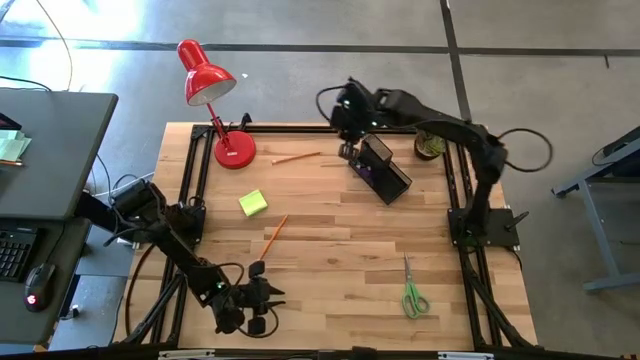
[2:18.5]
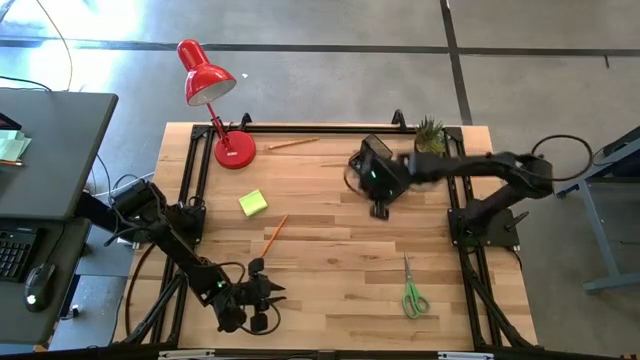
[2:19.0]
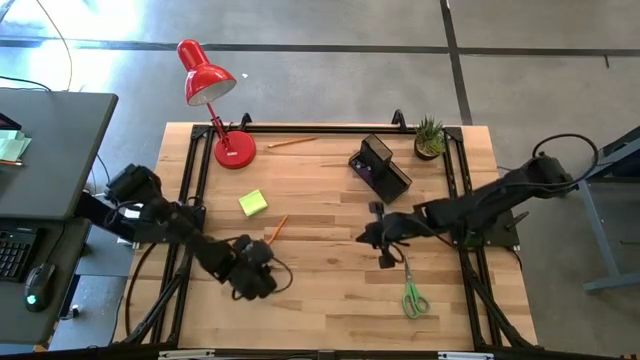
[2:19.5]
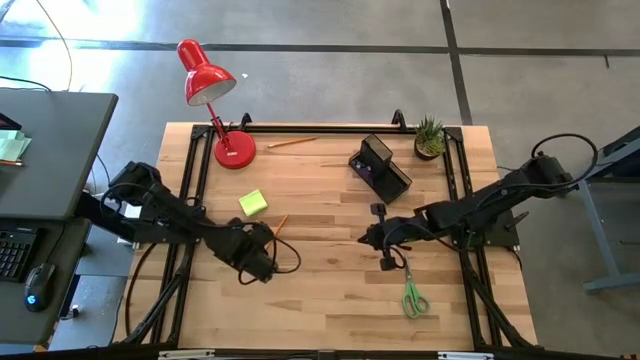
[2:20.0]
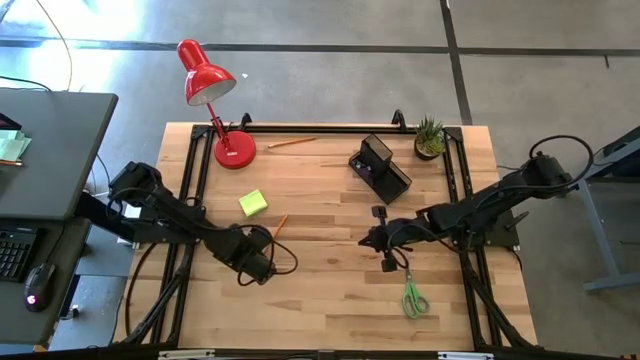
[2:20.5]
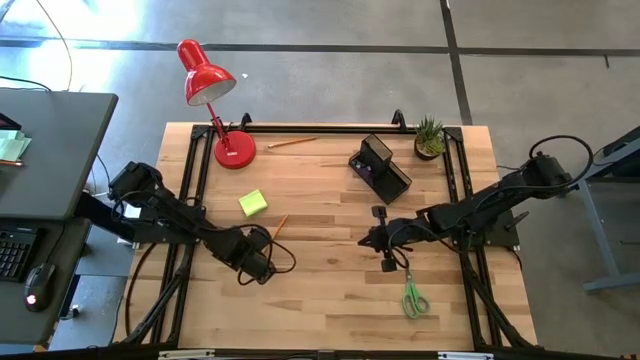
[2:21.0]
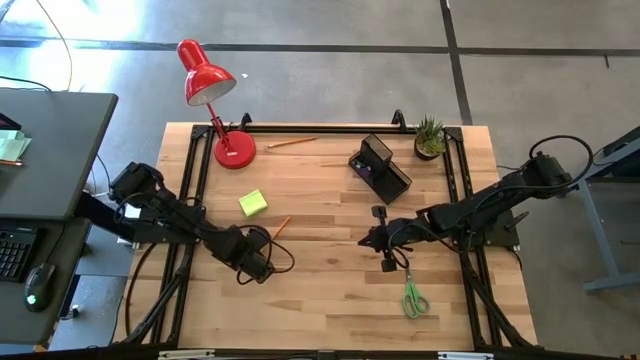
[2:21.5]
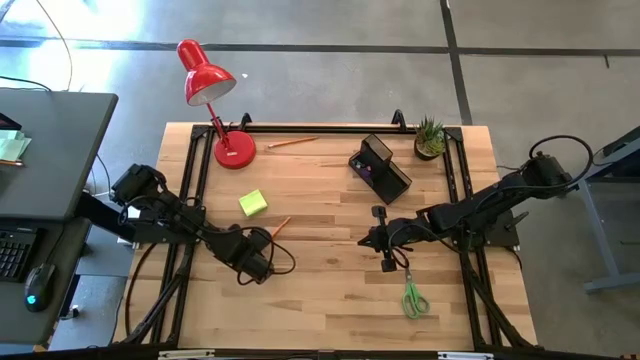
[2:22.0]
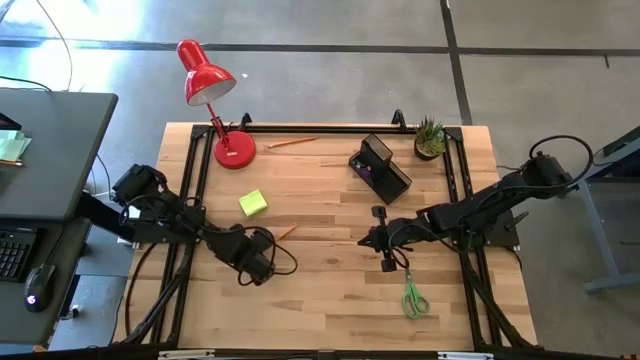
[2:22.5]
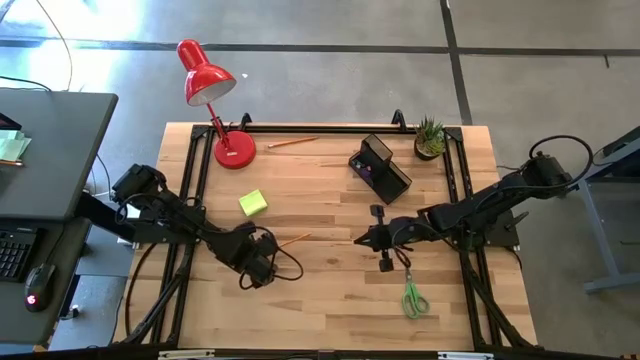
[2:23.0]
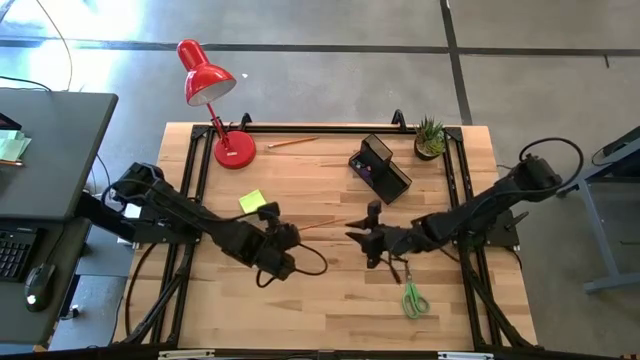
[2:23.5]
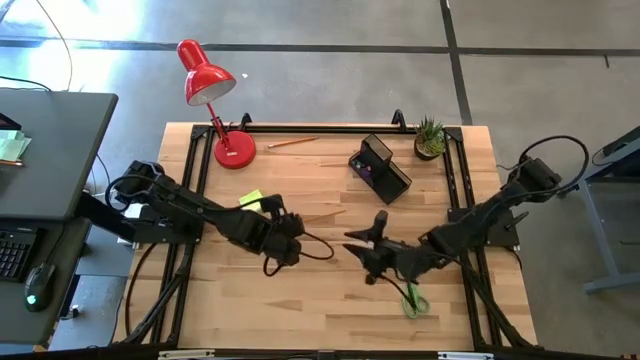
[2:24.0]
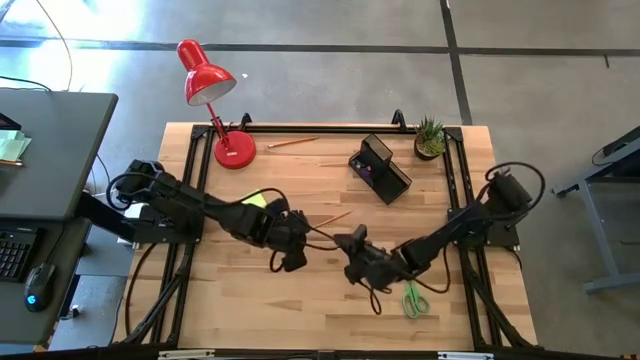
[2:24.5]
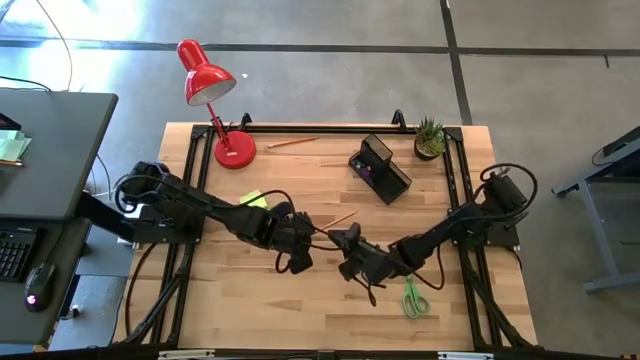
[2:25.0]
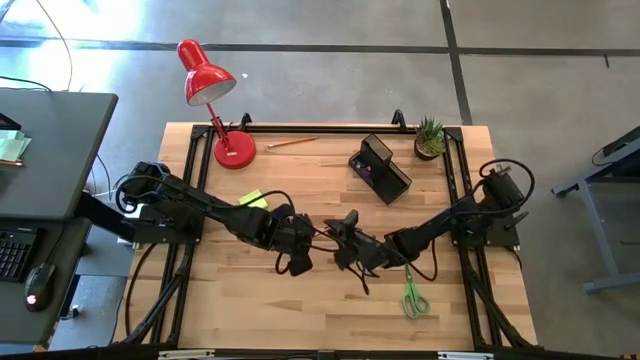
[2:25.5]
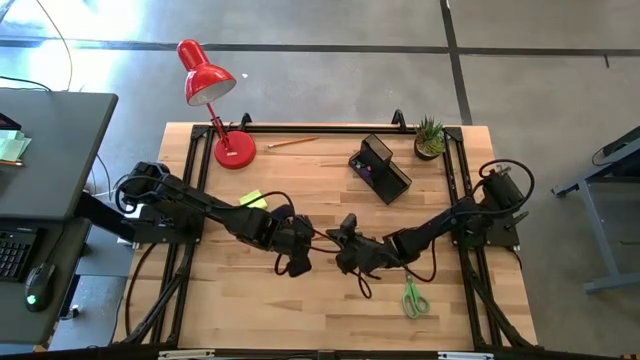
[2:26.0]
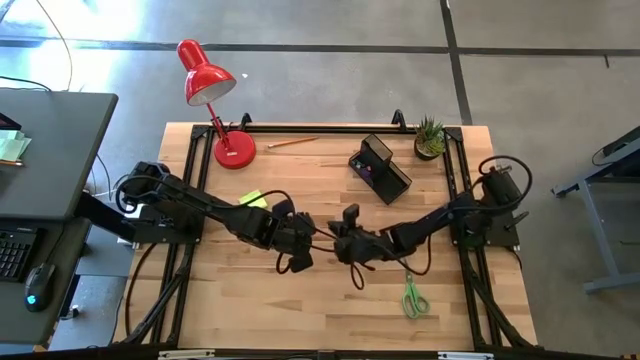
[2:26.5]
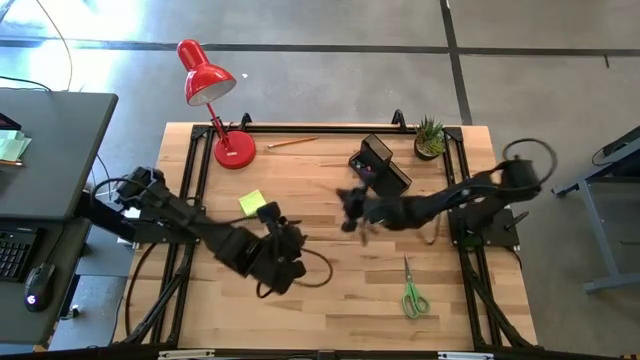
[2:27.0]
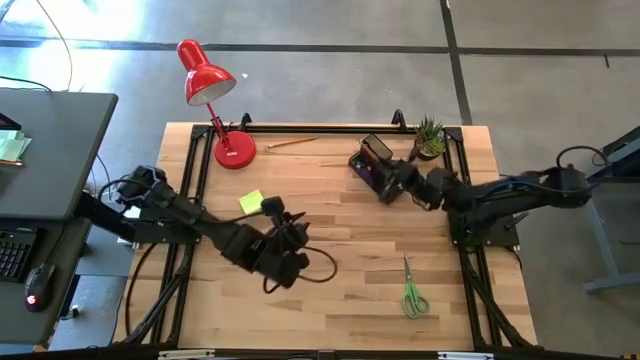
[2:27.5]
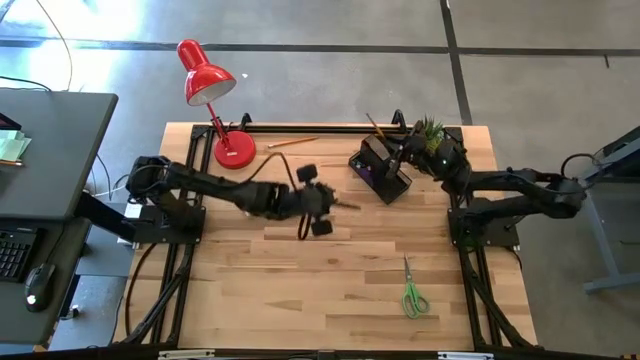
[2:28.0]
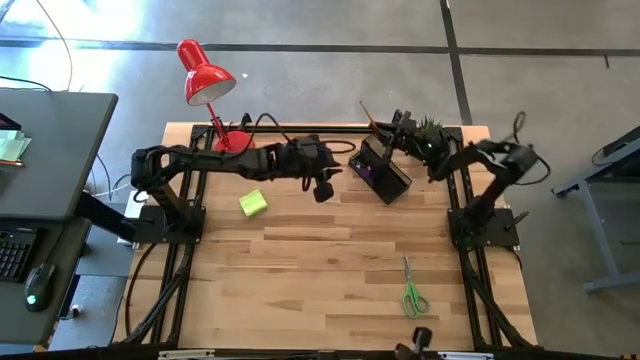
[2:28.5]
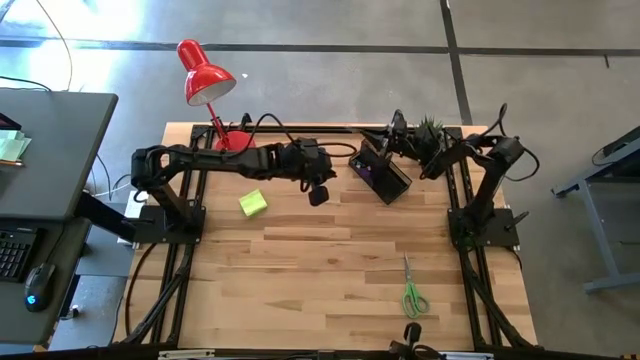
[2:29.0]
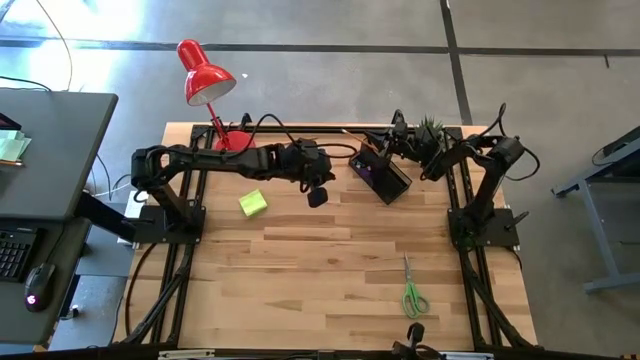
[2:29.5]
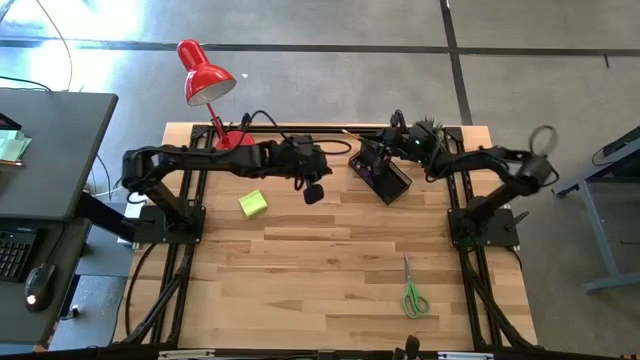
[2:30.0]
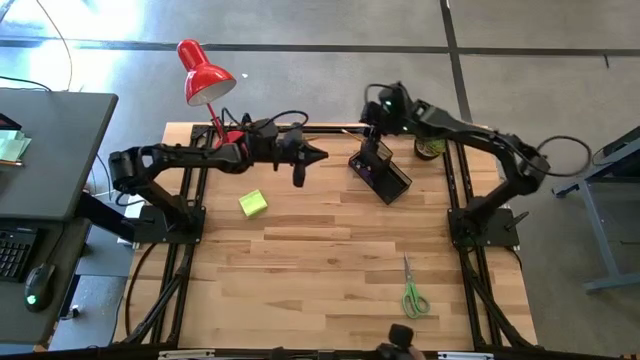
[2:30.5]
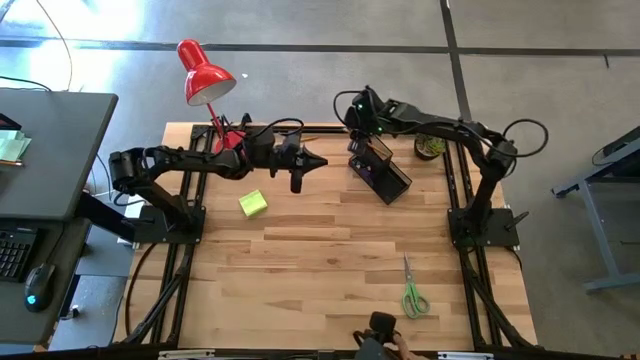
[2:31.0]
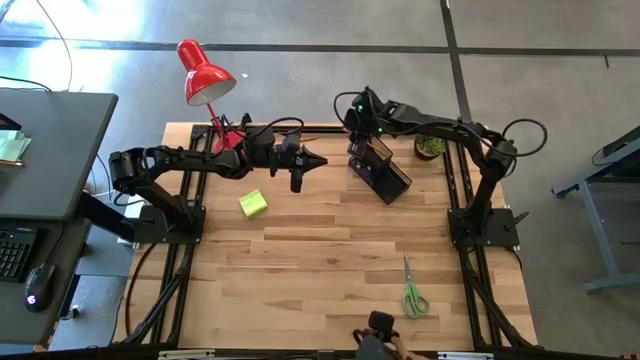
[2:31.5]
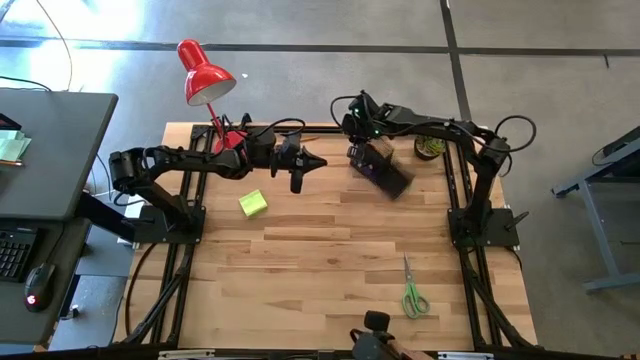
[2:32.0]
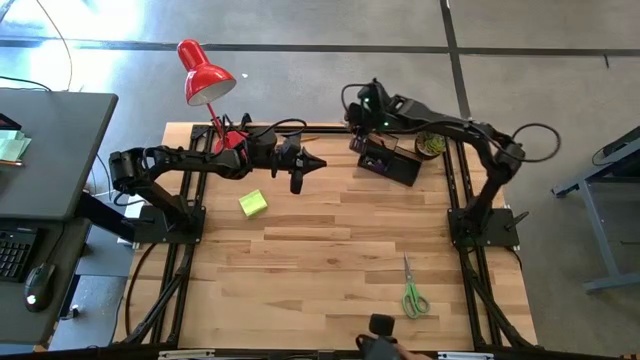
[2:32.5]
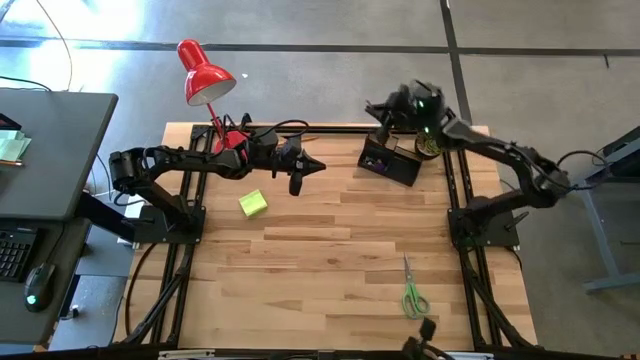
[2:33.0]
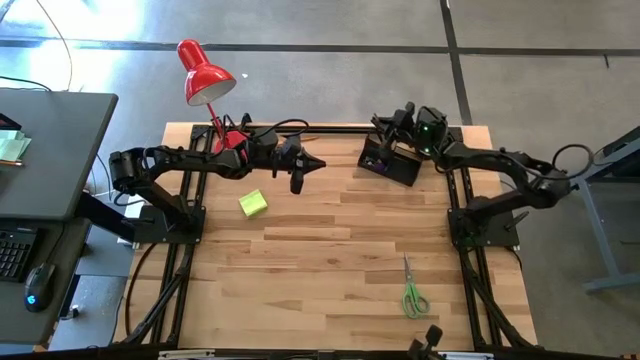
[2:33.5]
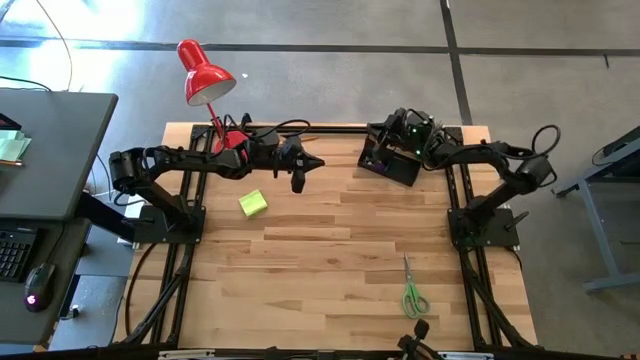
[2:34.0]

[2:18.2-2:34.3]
Task: Pick and place office supplies into organizer
Put the bottom yellow pencil into the black desk organizer

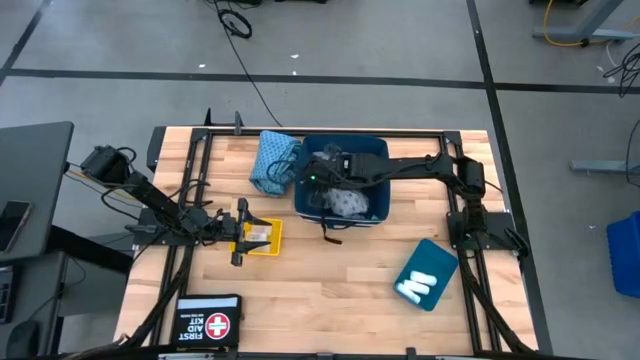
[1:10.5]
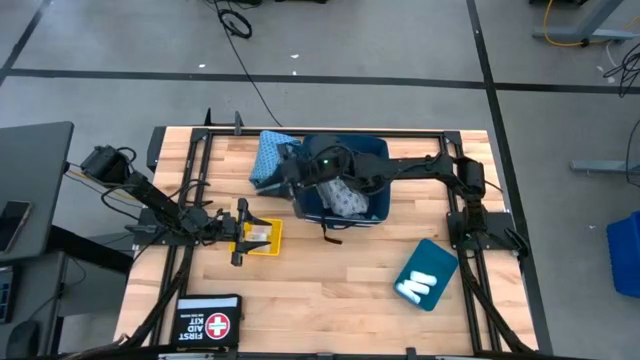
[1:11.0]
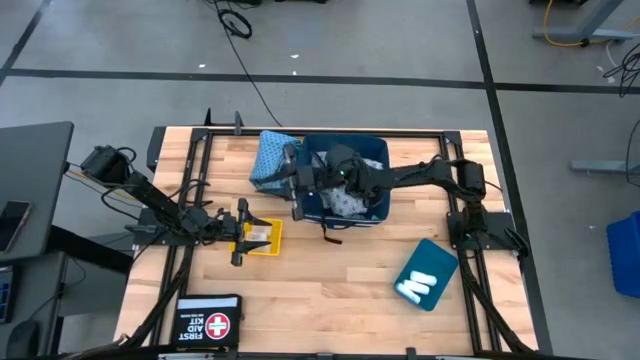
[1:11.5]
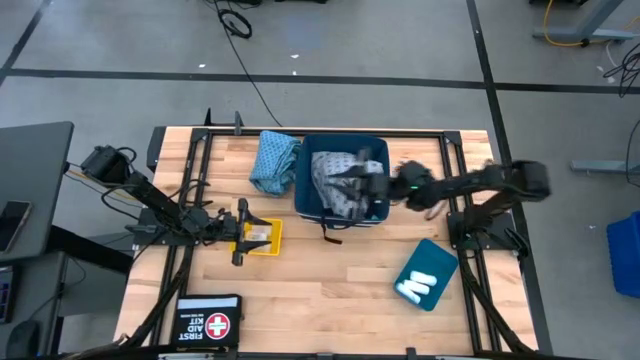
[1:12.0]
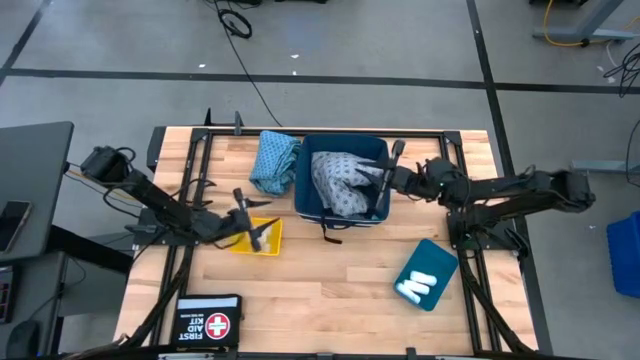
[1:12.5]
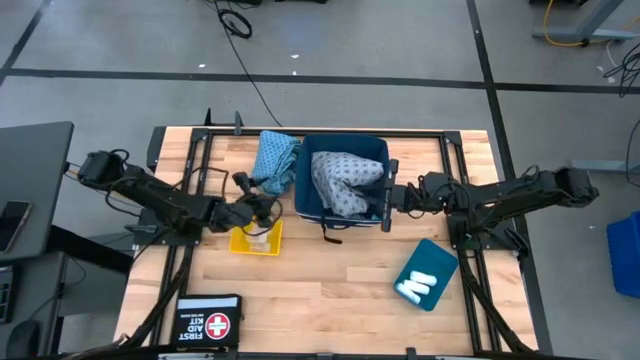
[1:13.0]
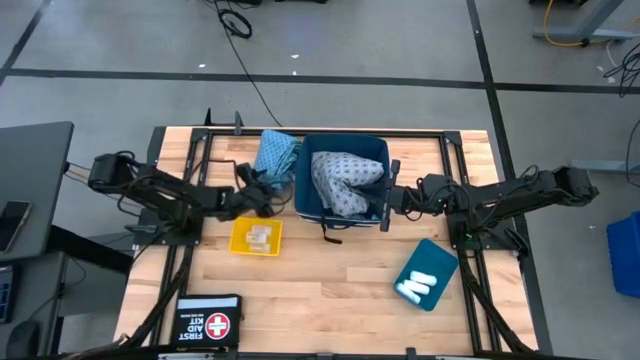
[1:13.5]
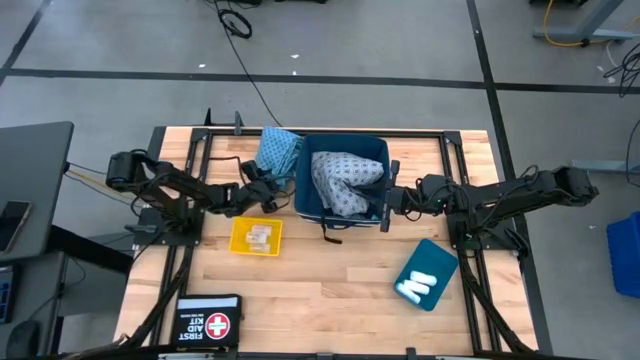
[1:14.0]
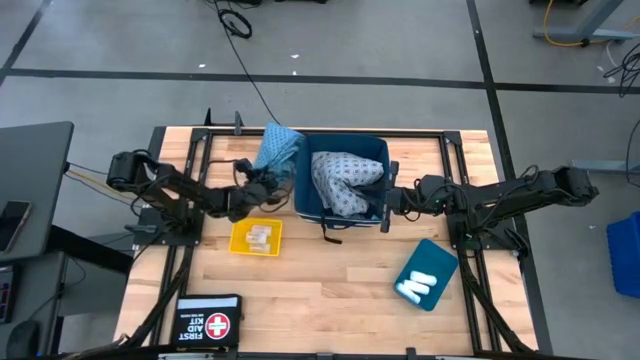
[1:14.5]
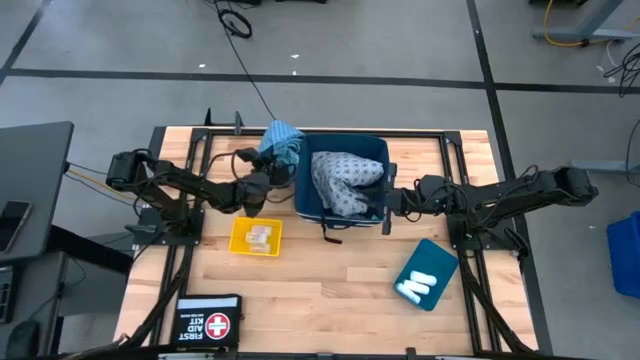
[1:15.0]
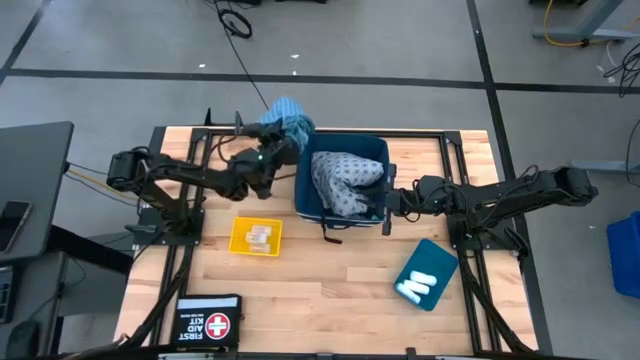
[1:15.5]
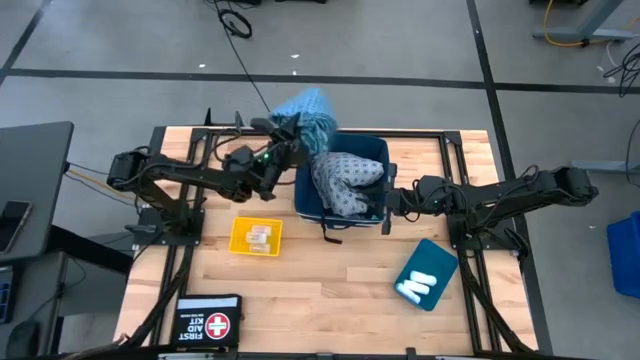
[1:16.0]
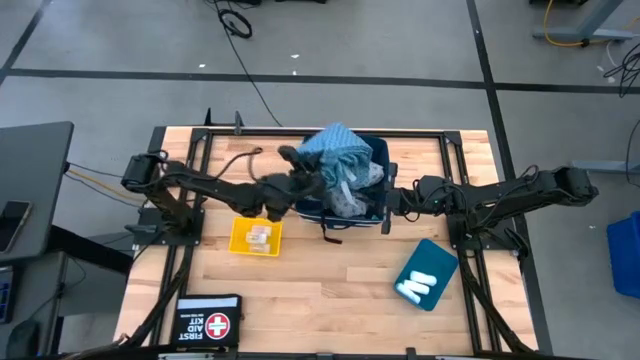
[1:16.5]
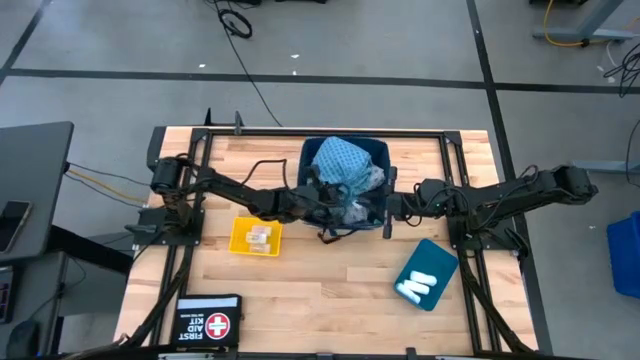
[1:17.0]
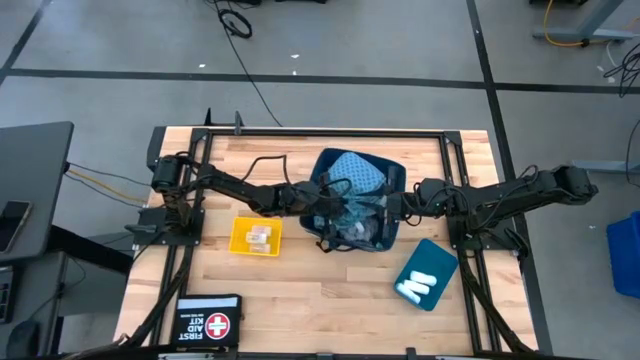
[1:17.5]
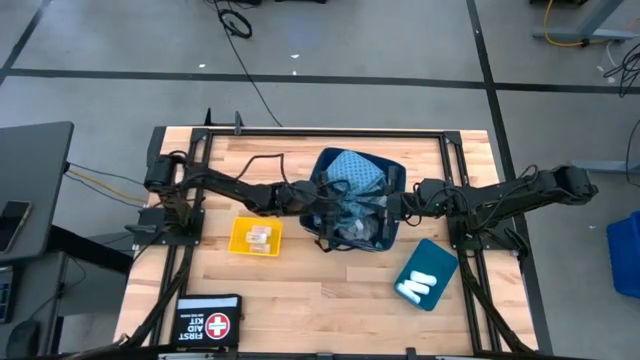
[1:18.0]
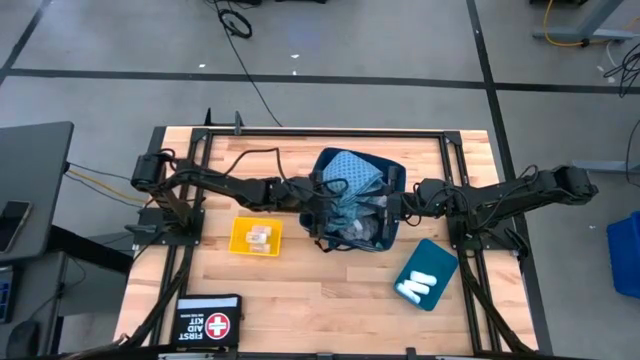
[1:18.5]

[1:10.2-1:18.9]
Task: Pick & place medical supplies in basket/bin
Put the blue gown into the dark blue bin
